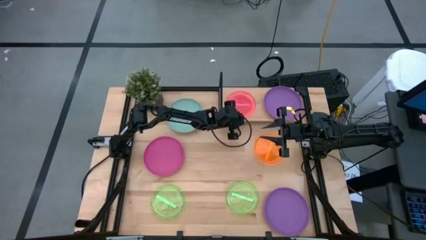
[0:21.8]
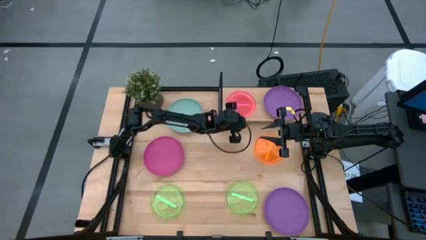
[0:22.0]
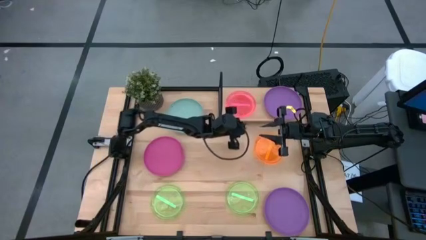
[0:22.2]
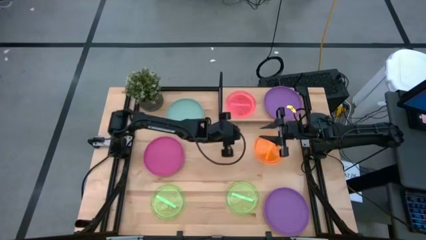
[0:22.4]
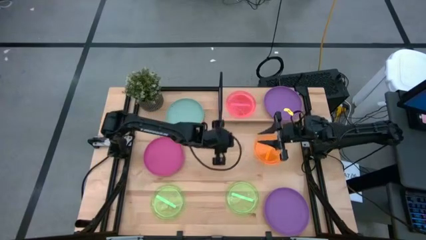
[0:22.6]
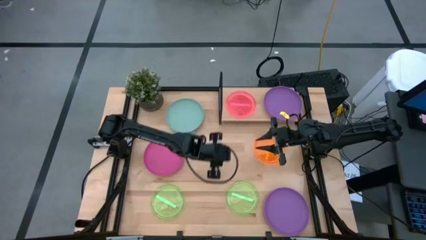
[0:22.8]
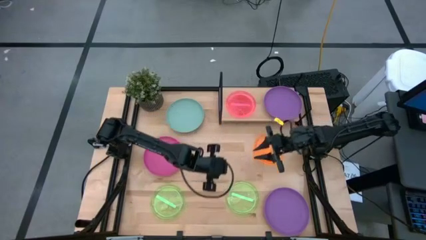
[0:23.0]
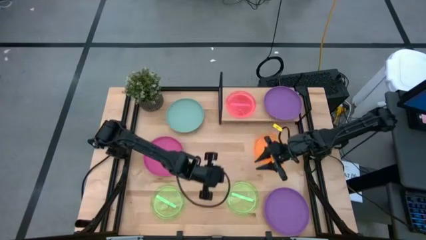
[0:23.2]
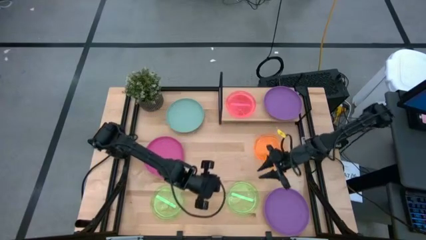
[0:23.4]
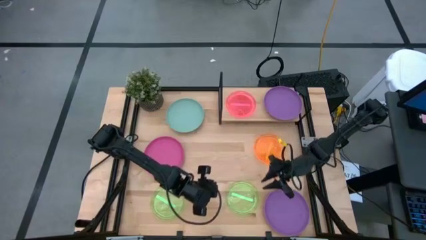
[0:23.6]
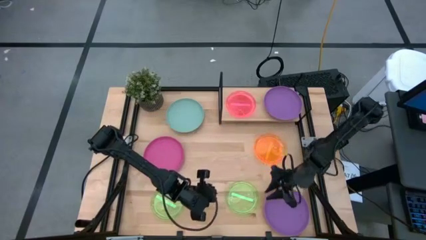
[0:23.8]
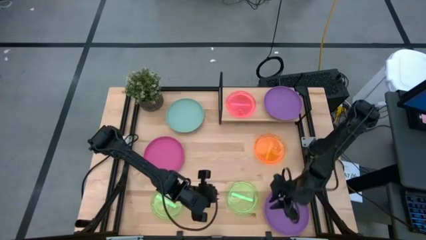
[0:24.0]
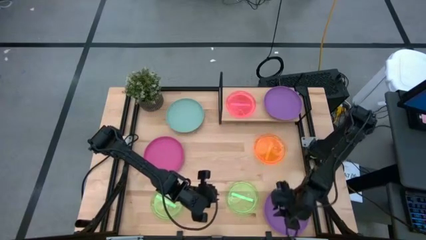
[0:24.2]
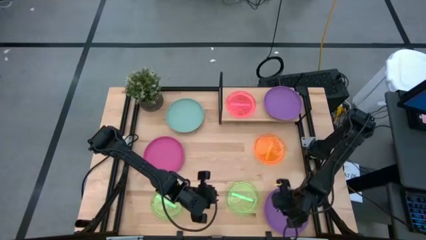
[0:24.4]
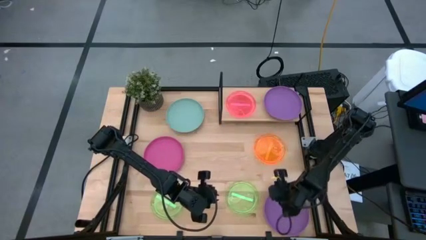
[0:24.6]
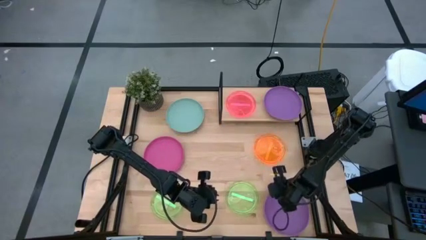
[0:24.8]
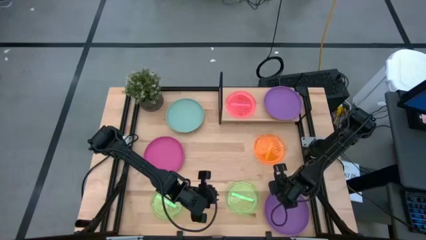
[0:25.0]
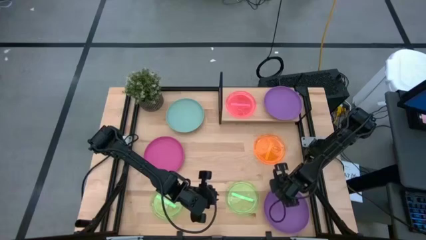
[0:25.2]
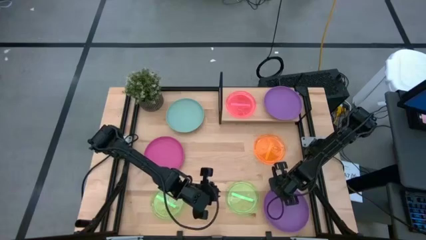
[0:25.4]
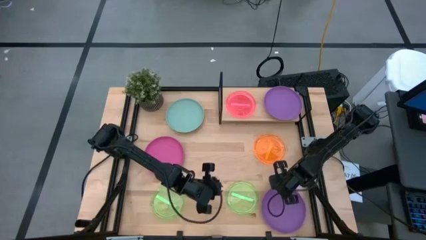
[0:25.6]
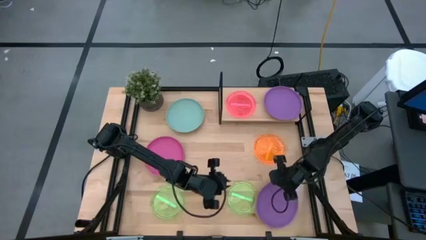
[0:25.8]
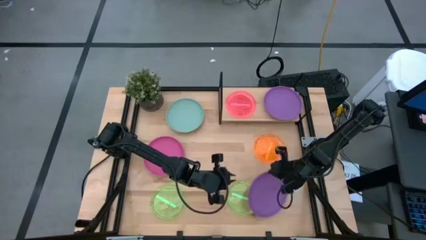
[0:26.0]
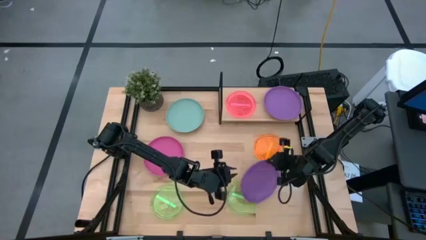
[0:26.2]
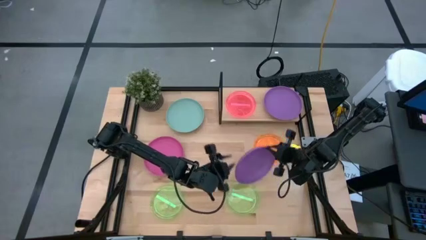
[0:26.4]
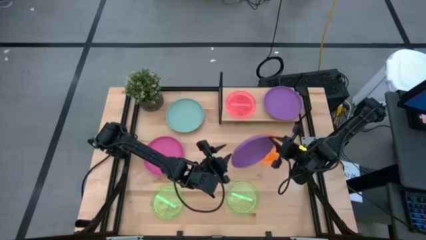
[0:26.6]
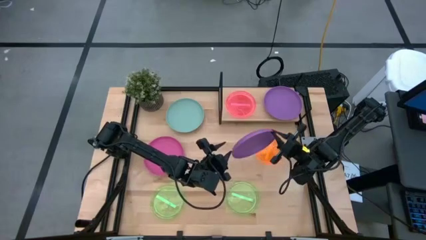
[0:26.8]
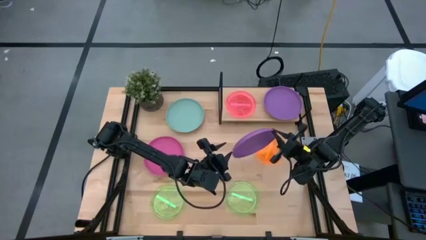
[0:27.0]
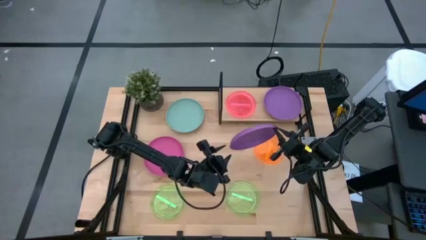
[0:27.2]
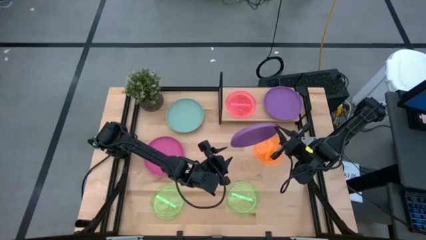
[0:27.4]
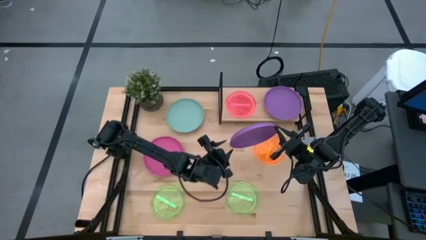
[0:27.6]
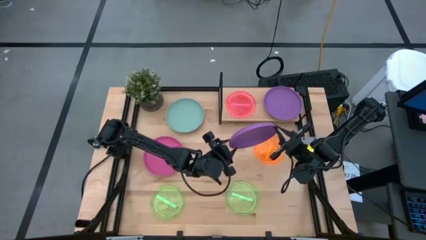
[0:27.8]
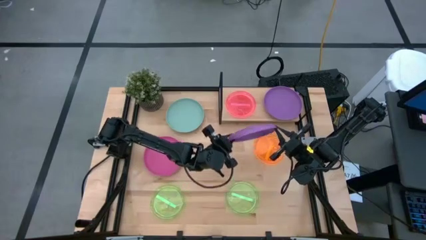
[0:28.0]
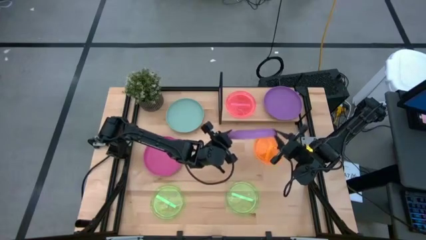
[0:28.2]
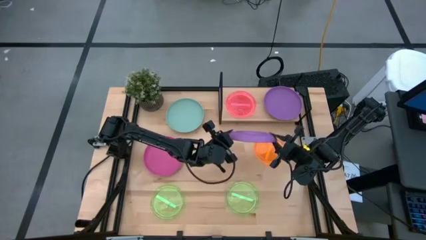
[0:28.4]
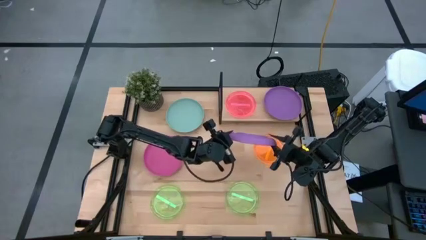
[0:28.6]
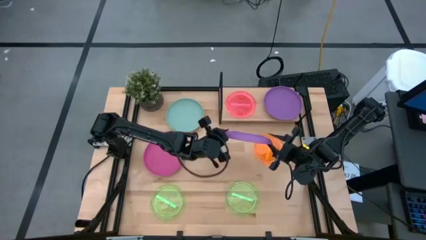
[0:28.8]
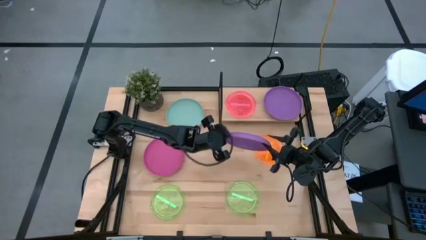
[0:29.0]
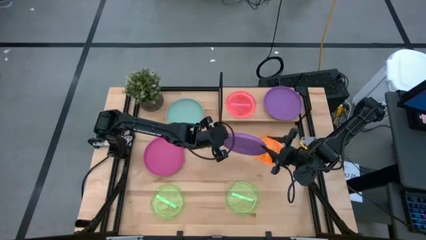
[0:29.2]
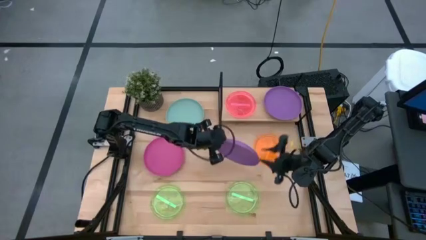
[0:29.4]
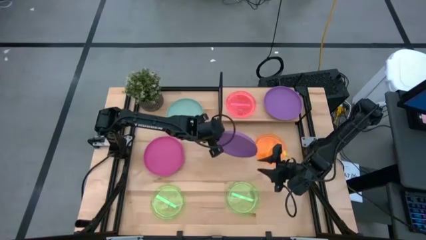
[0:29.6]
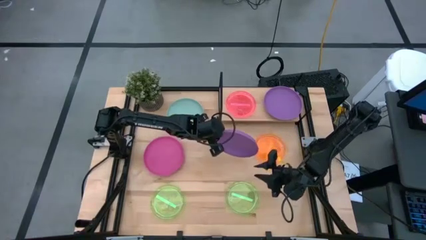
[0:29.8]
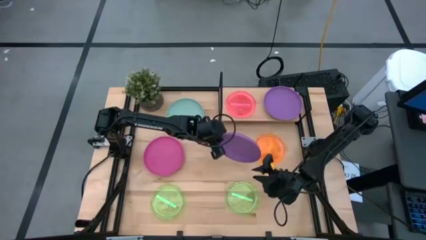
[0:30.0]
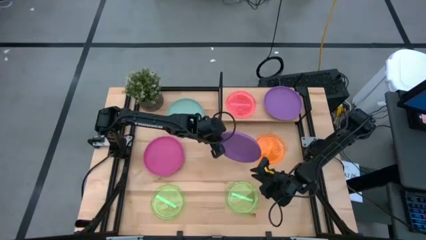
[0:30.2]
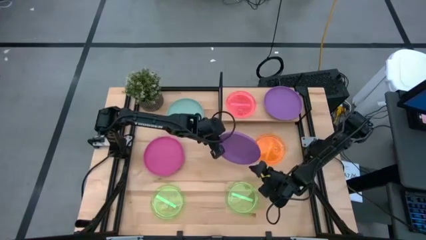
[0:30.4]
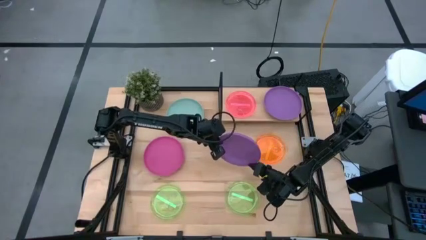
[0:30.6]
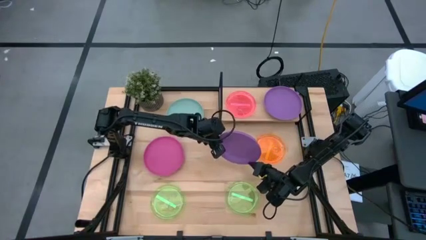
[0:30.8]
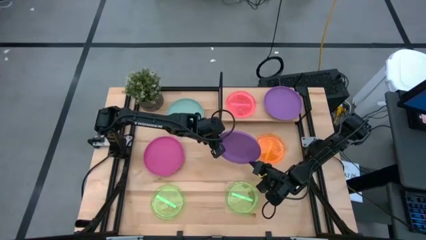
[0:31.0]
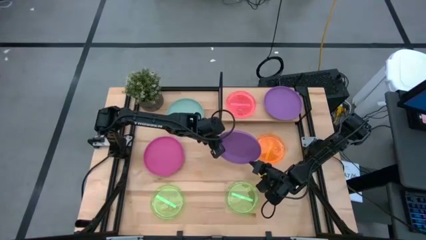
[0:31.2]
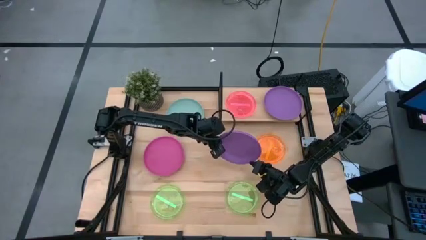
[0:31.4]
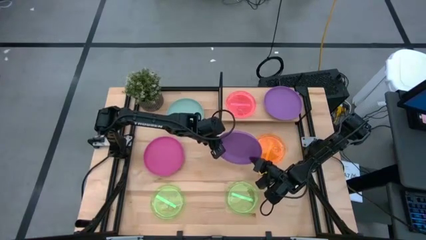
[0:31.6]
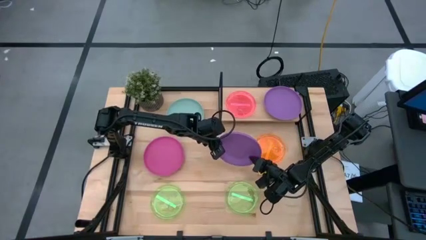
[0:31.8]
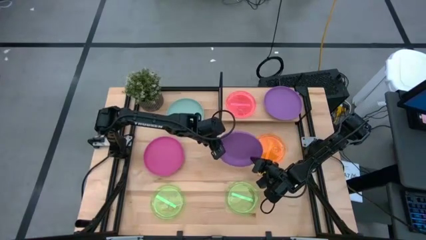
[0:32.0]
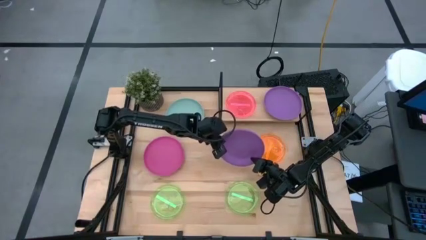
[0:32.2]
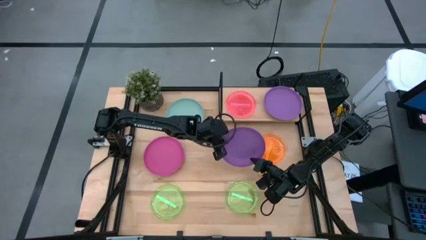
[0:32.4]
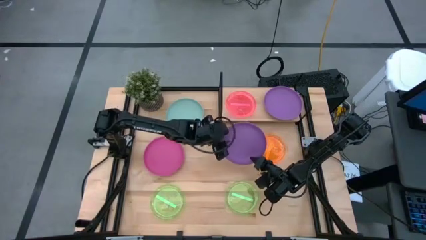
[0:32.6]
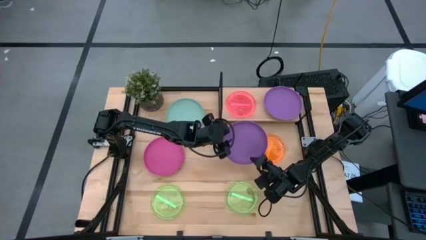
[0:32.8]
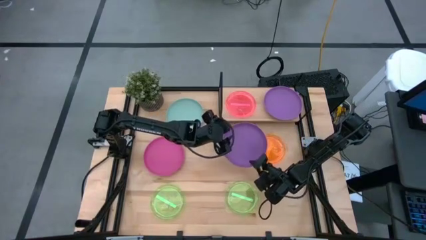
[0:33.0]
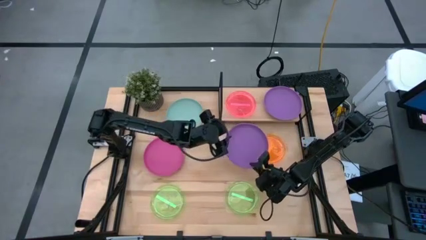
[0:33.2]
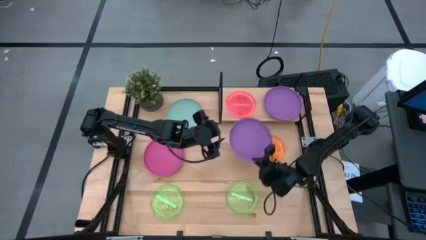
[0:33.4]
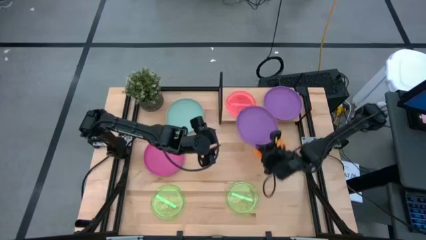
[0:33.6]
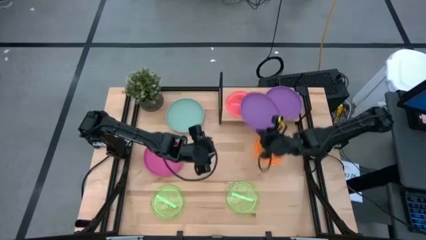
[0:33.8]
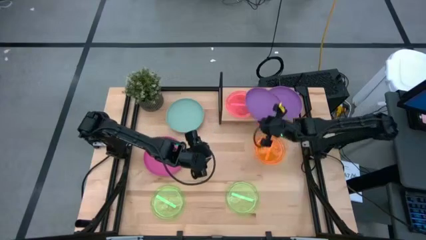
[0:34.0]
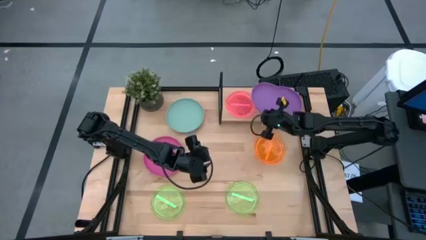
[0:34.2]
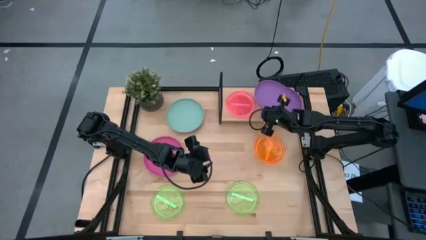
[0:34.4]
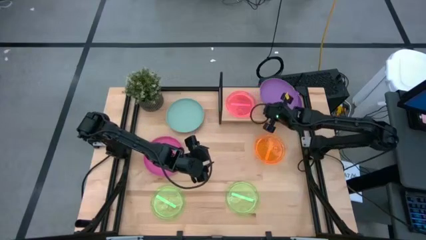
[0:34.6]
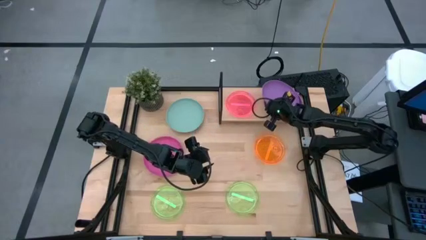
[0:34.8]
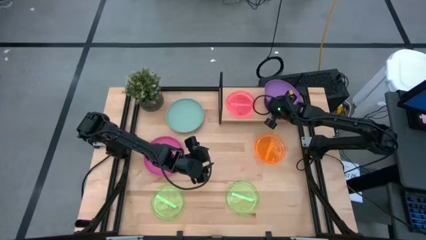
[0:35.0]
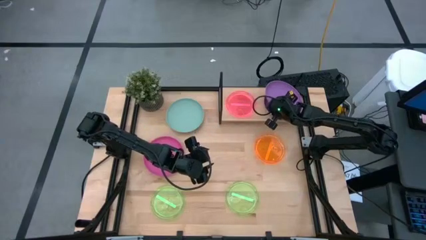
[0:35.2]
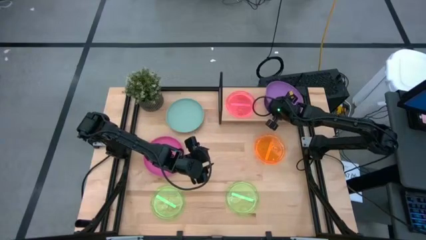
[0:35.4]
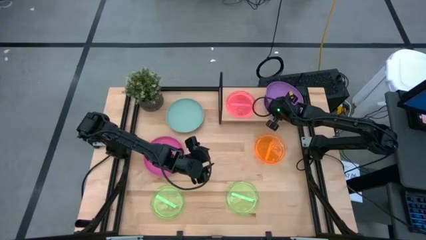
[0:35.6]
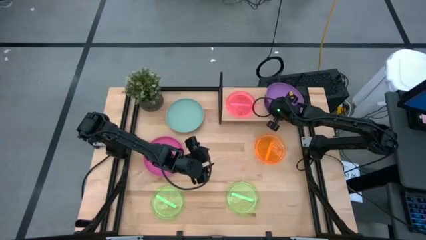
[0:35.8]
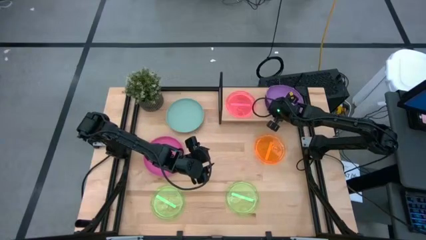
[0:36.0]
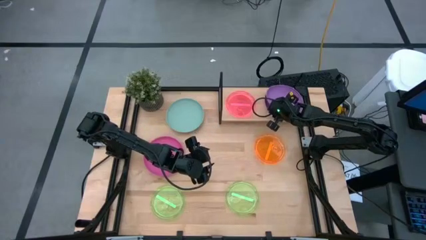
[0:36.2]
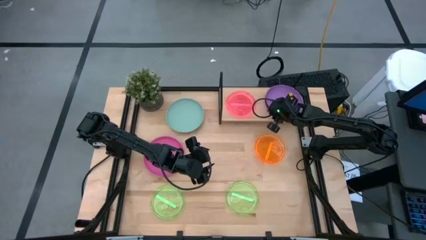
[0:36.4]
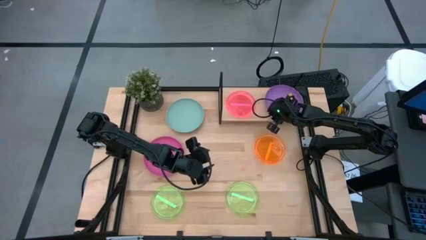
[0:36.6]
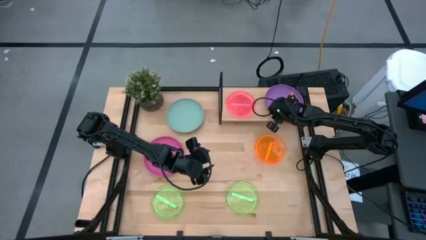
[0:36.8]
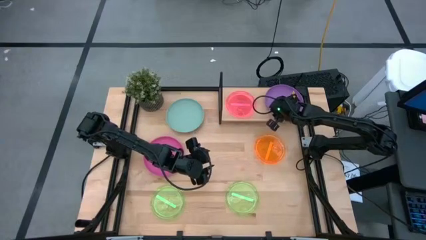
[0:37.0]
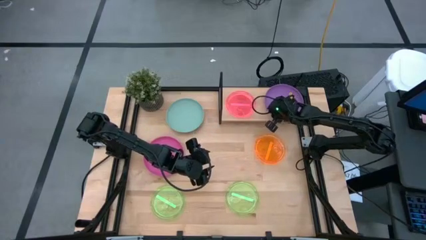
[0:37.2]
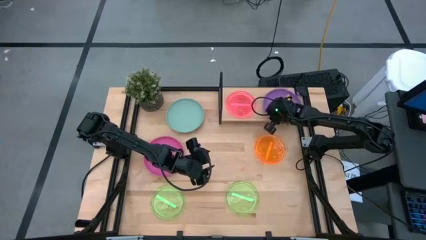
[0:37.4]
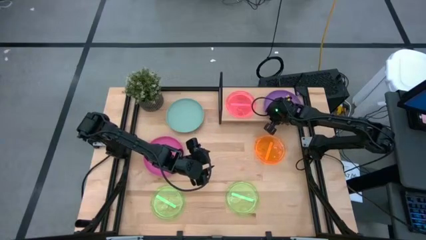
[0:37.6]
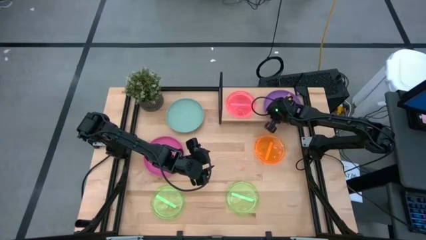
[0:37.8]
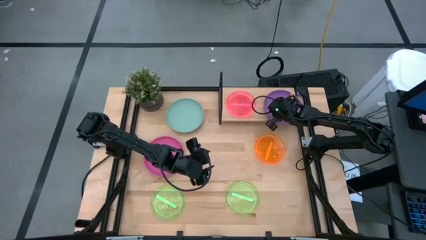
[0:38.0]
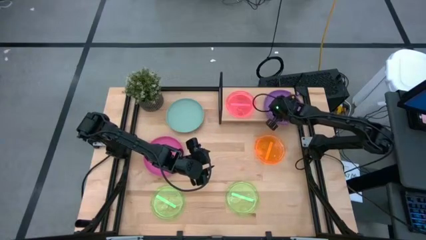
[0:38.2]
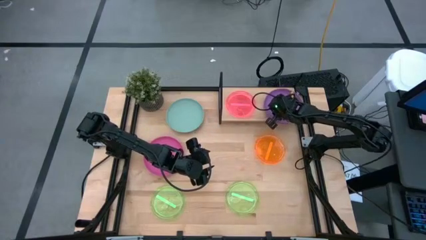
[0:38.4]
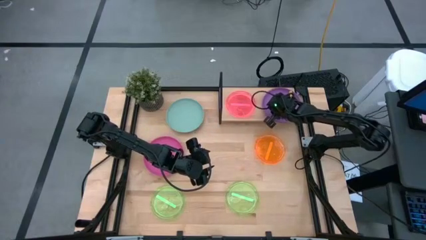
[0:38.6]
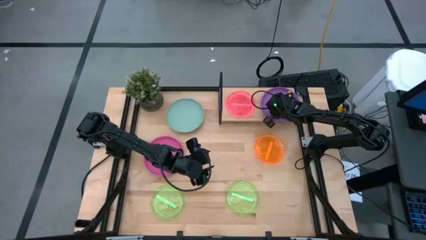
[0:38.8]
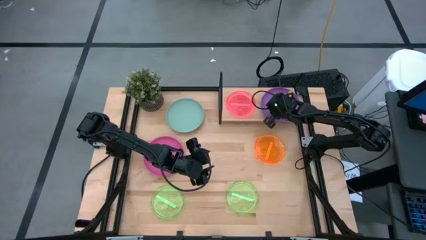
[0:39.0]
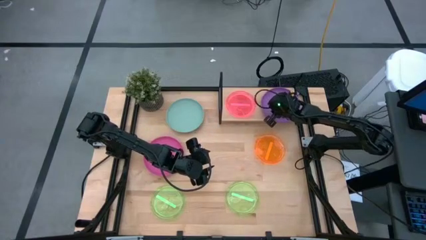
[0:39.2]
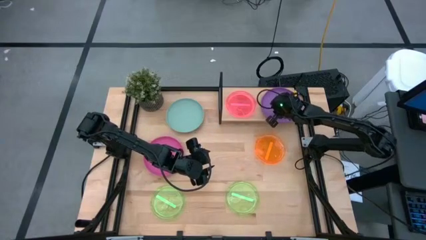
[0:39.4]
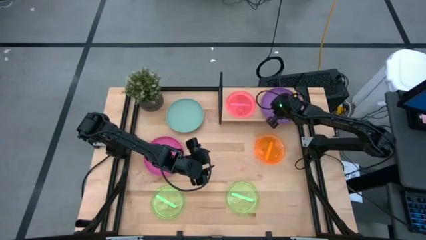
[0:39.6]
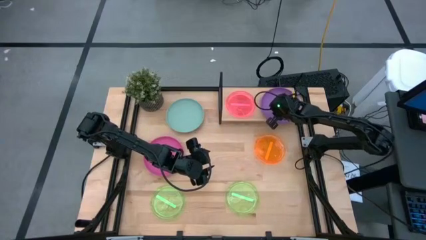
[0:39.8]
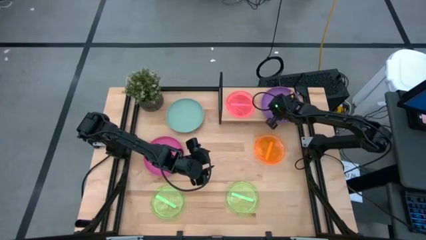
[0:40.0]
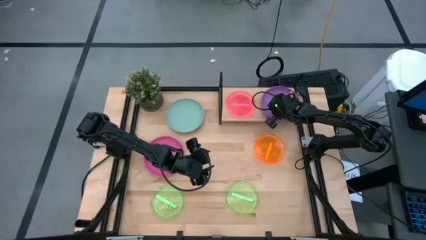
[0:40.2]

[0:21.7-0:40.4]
Task: Place and stack plates onto a shelf
Stack the big violet plate on top of the big violet plate
